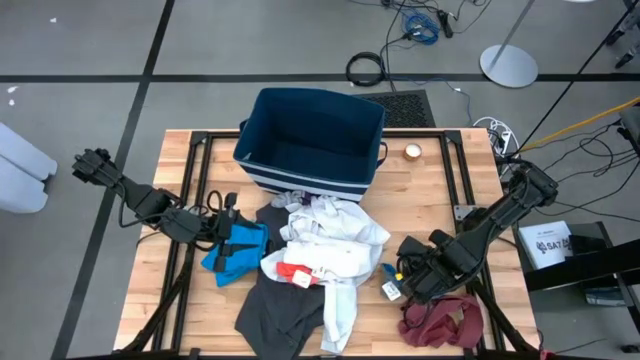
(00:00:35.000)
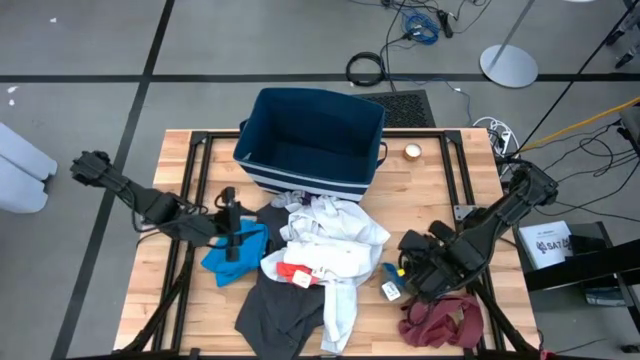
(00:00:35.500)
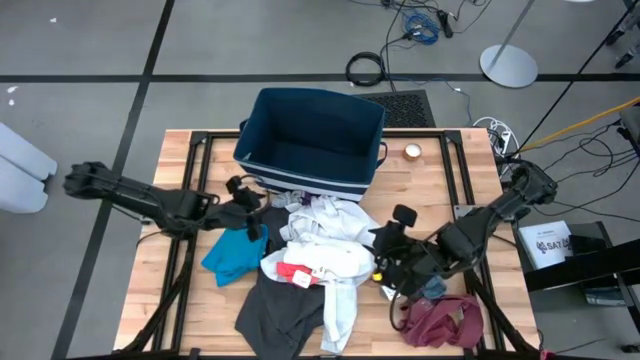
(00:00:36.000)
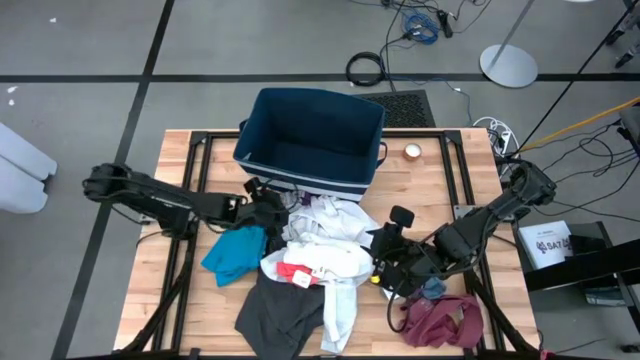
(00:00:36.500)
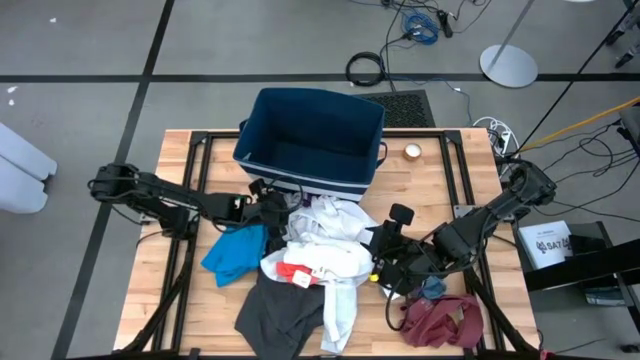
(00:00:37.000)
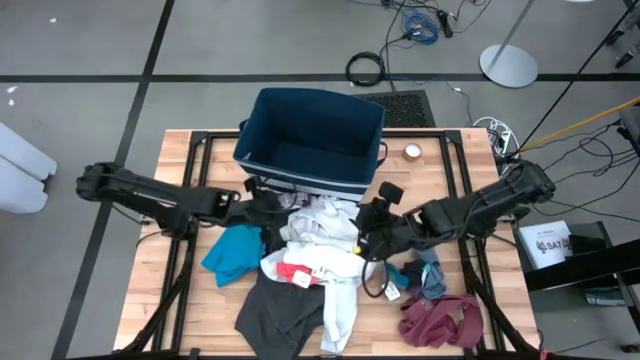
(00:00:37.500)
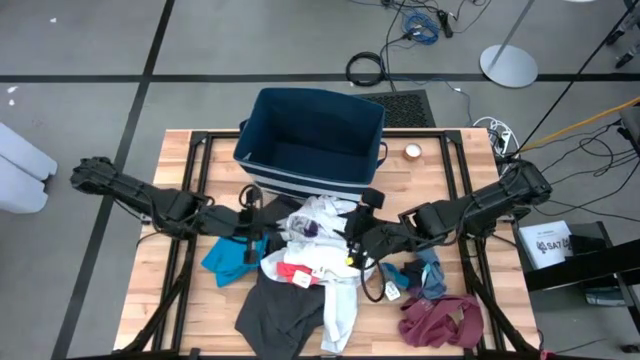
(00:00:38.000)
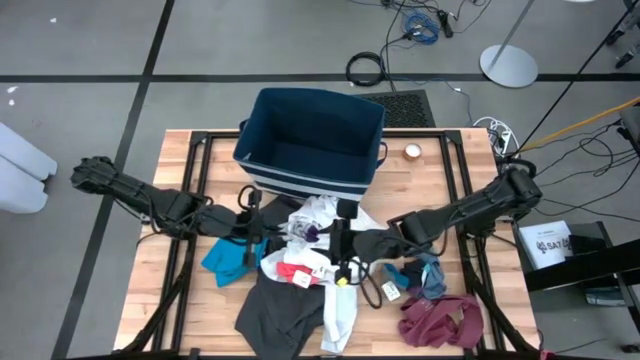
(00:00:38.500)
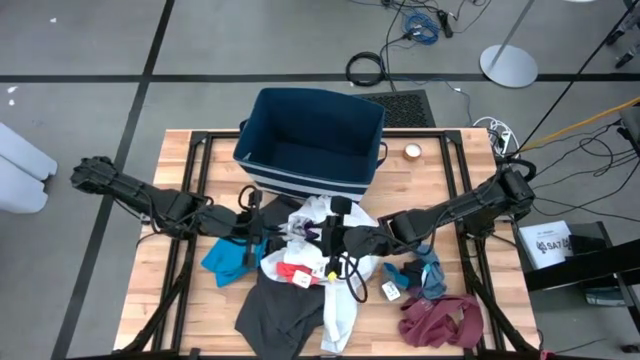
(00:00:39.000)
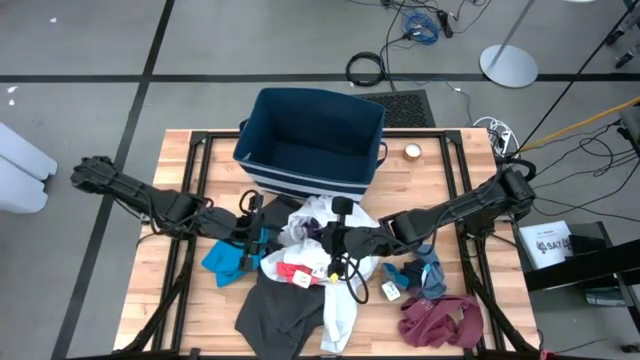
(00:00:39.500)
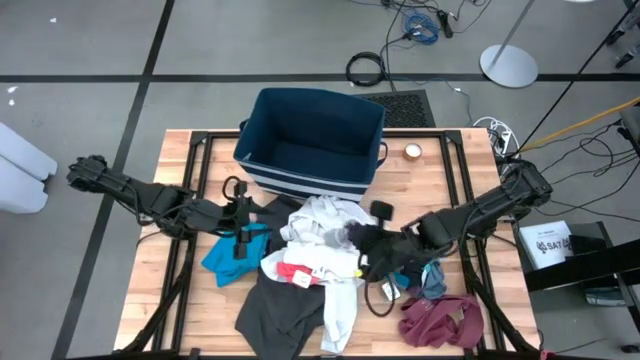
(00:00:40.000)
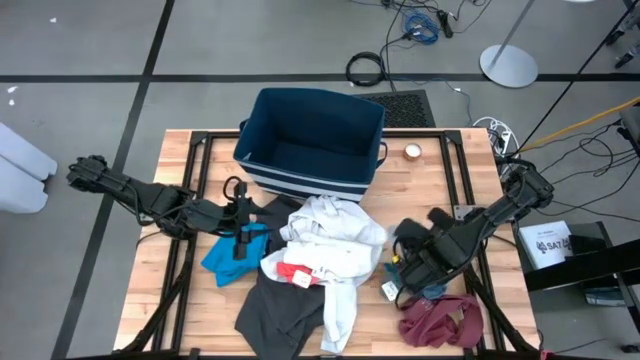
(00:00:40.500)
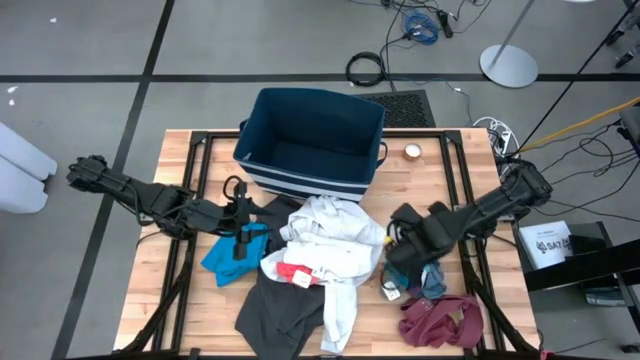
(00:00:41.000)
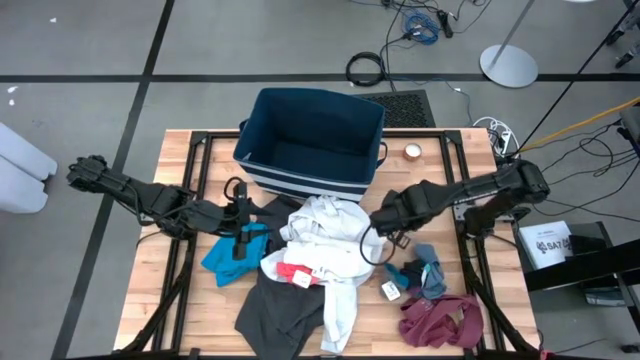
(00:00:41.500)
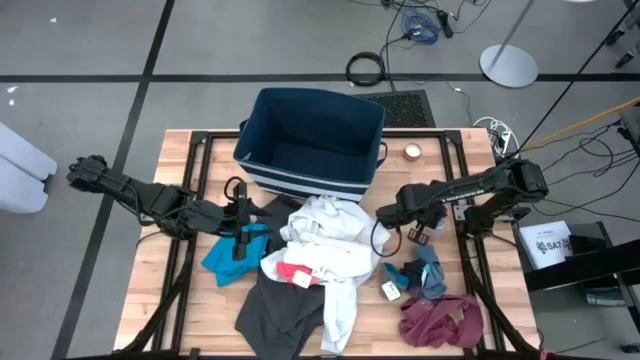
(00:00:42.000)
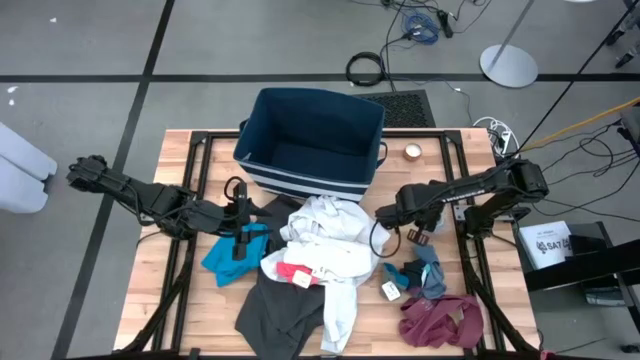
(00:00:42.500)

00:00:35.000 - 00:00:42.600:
Task: Sort clothes
Move the gray and purple sock to the right of the table

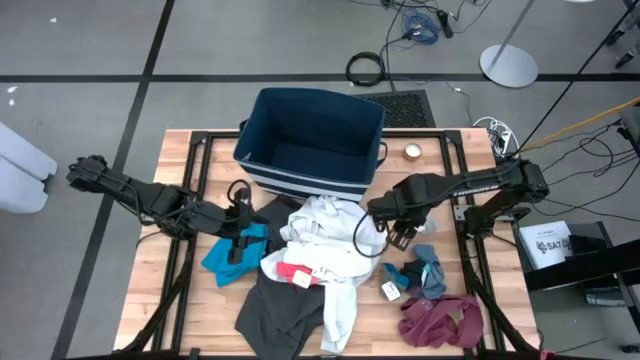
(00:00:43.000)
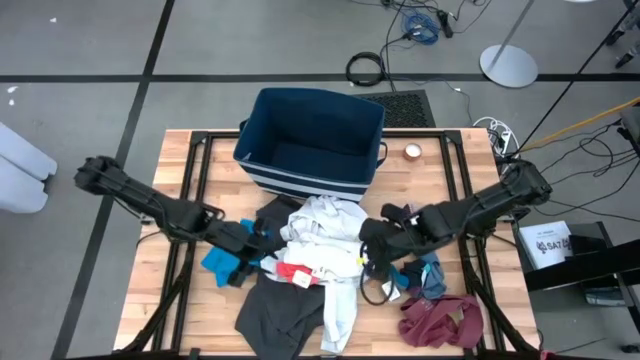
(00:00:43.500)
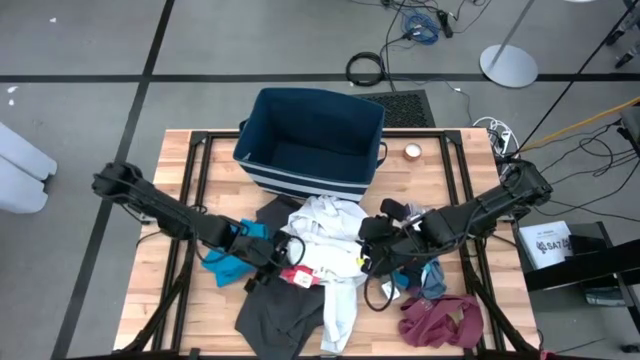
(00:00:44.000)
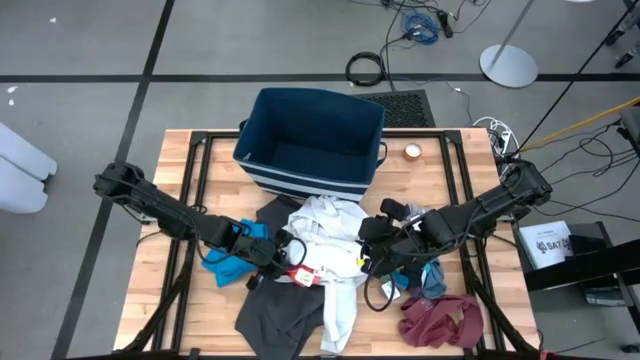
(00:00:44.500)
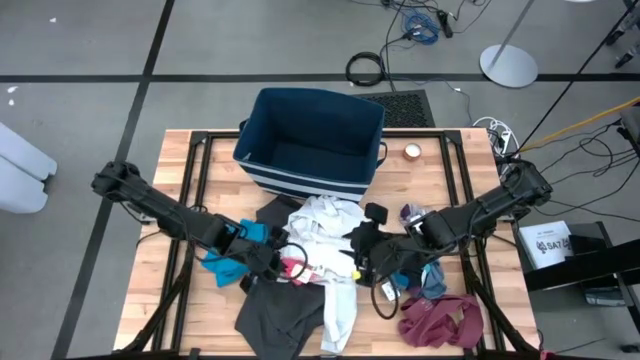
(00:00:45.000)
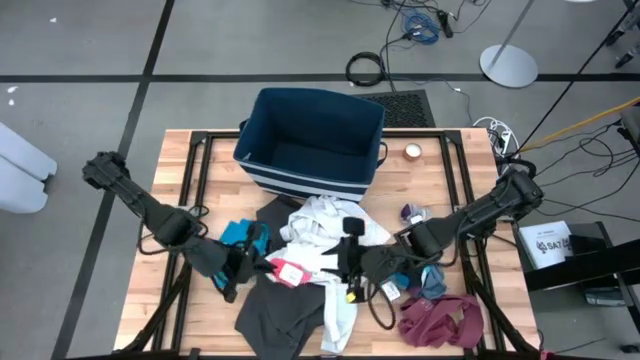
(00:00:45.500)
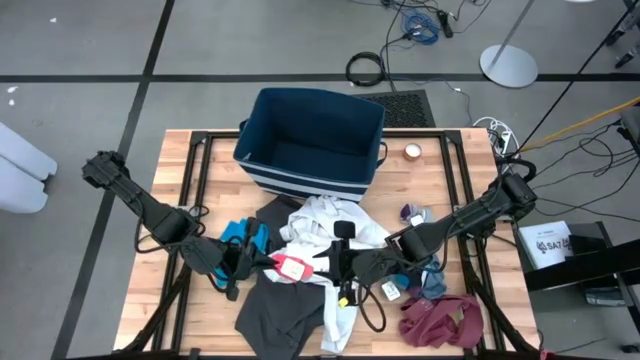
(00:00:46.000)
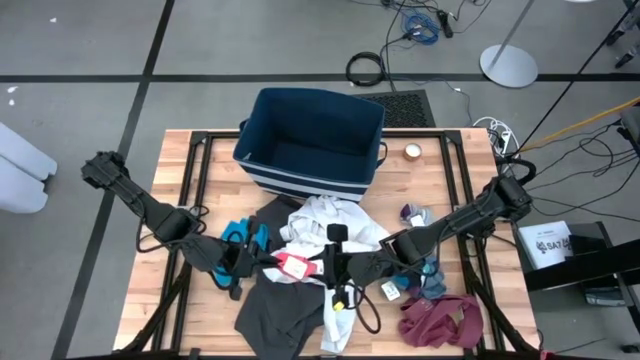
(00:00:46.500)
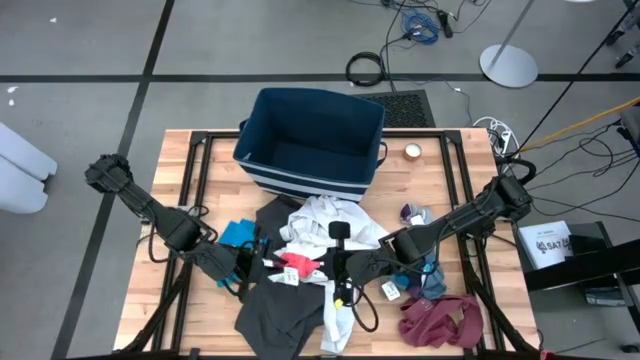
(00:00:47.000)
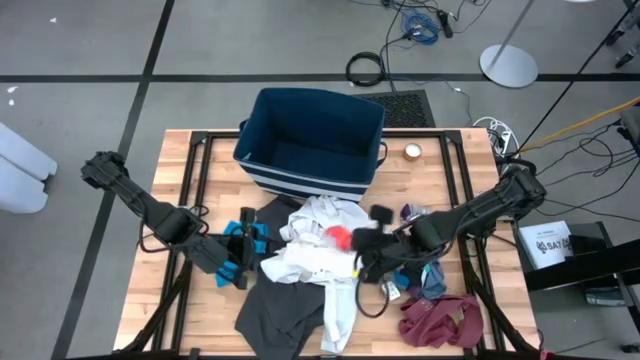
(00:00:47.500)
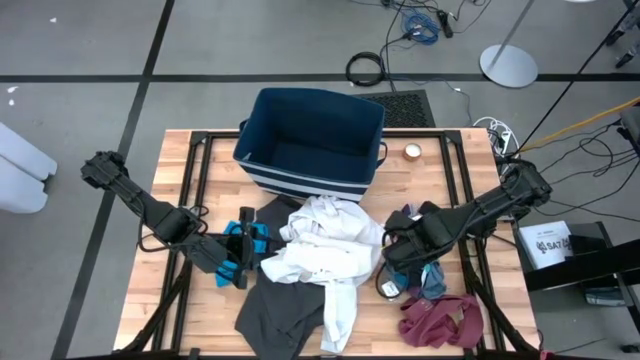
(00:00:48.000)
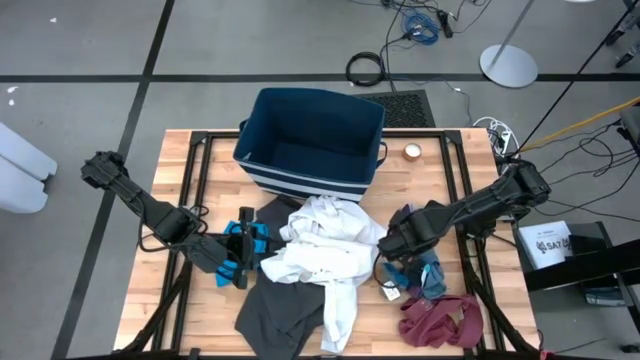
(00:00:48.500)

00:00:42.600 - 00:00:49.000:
Move the orange sock to the right of the table

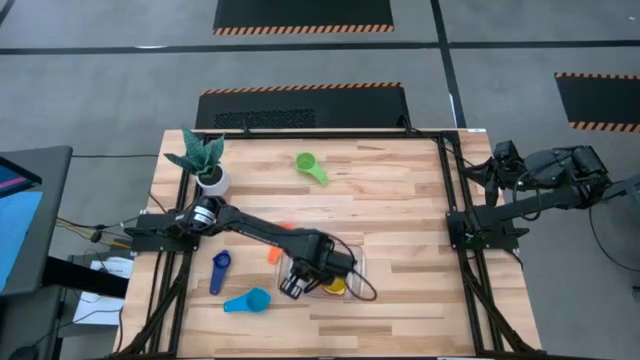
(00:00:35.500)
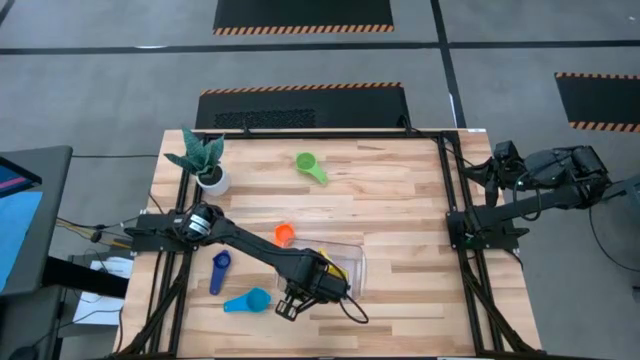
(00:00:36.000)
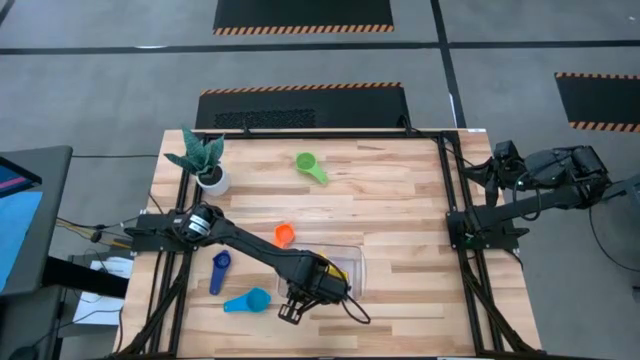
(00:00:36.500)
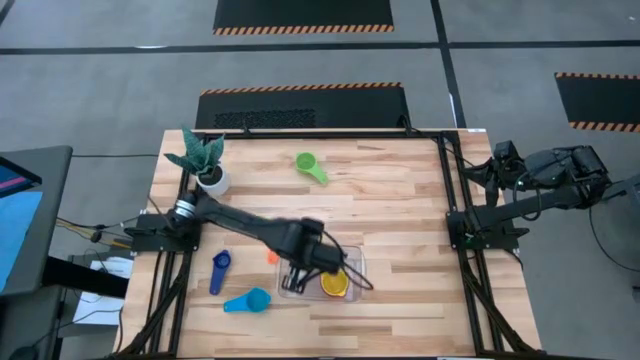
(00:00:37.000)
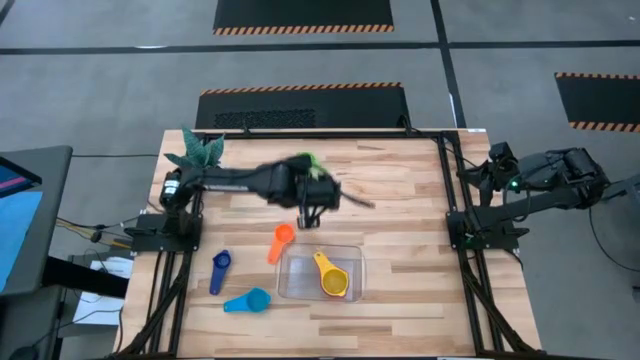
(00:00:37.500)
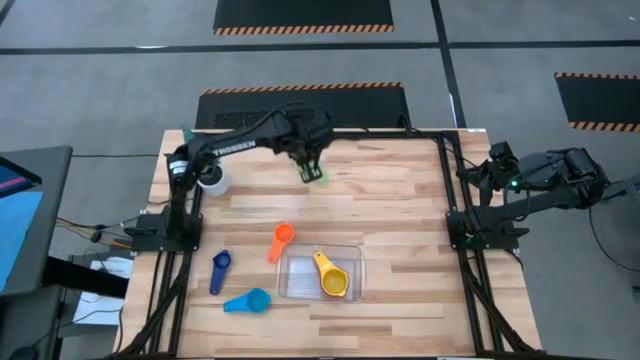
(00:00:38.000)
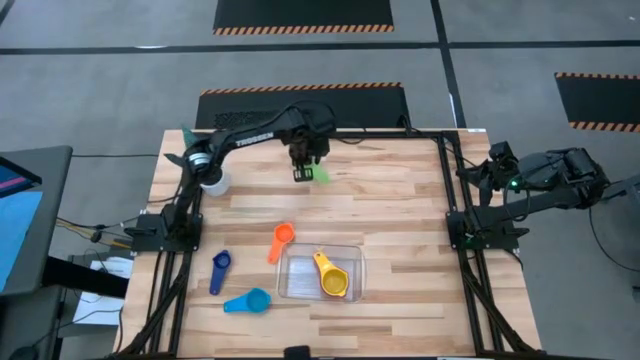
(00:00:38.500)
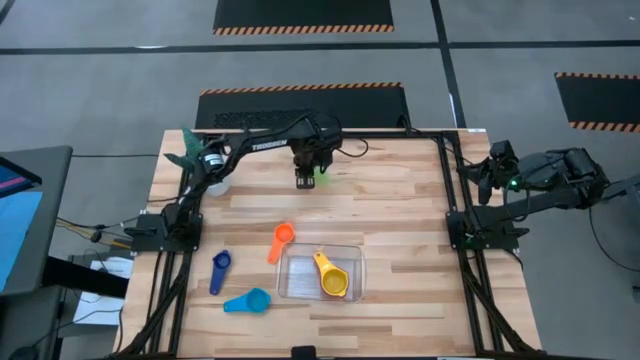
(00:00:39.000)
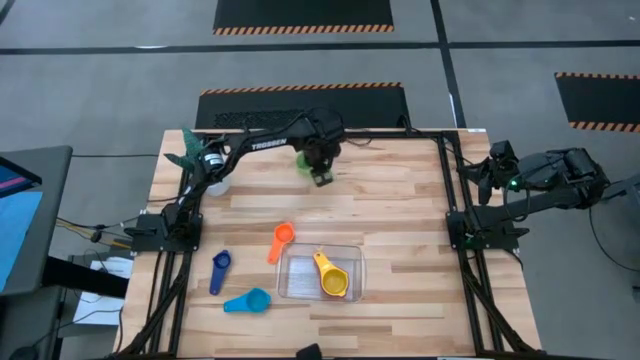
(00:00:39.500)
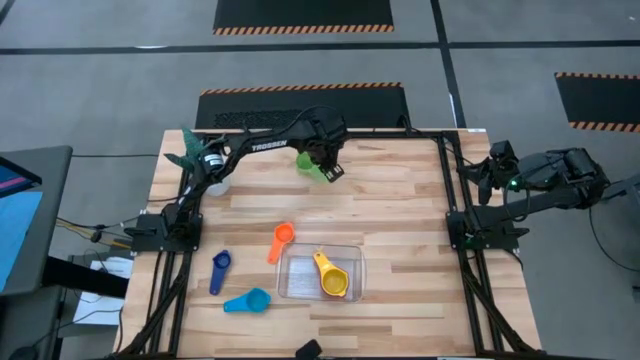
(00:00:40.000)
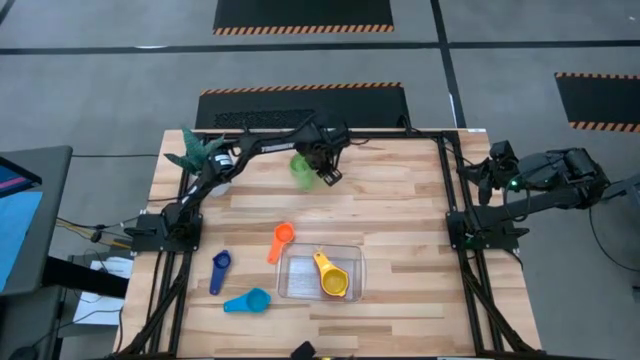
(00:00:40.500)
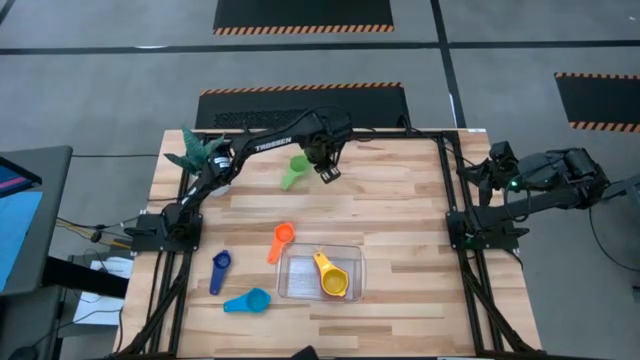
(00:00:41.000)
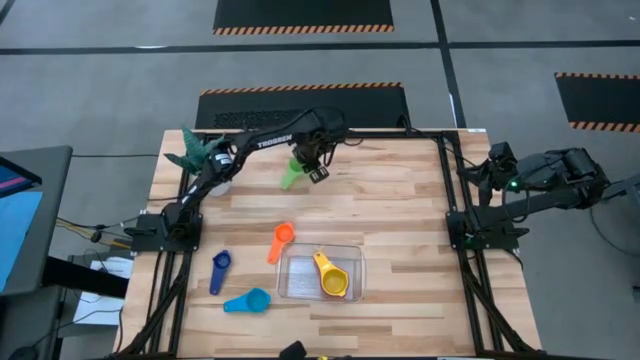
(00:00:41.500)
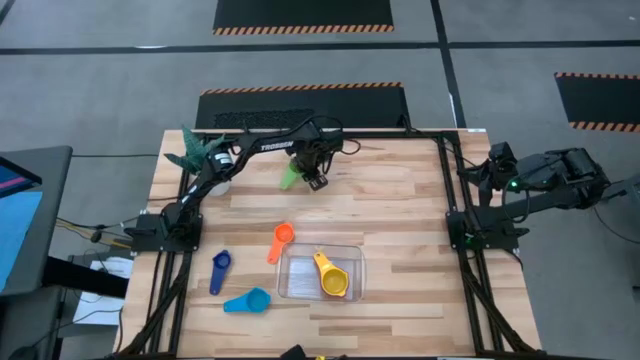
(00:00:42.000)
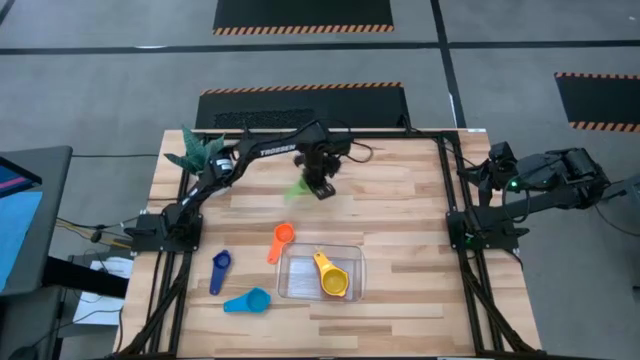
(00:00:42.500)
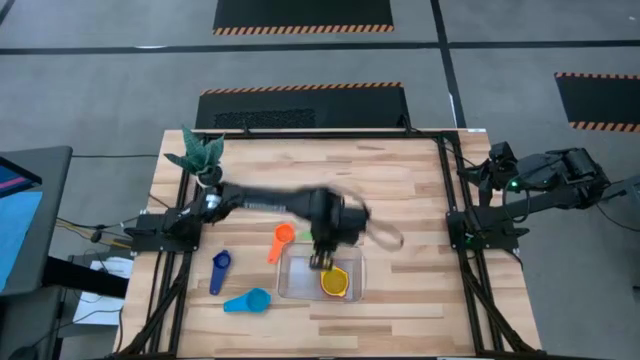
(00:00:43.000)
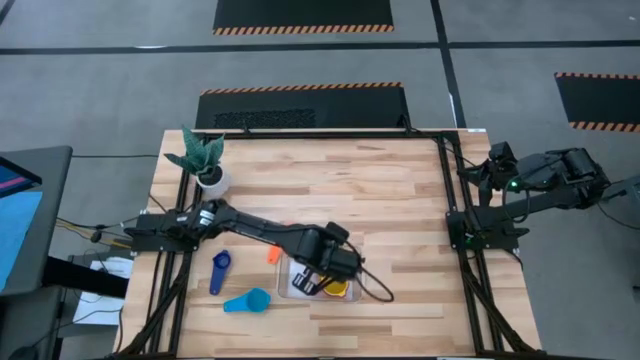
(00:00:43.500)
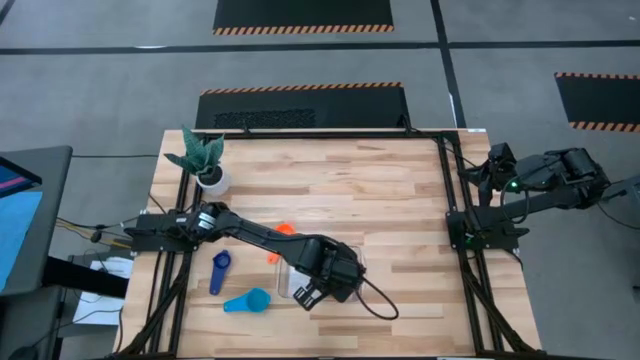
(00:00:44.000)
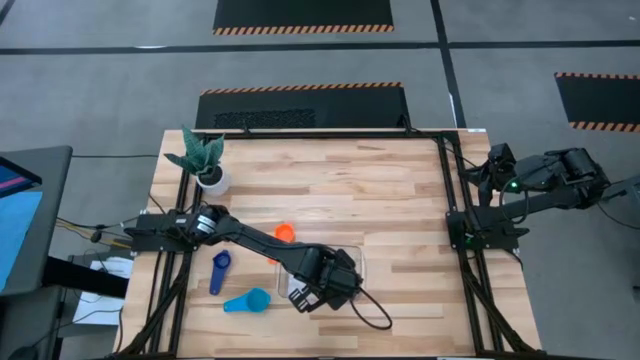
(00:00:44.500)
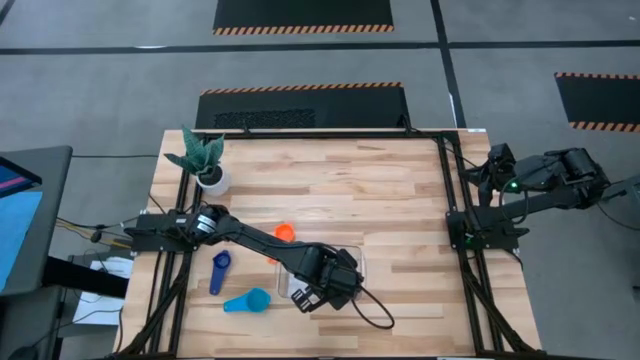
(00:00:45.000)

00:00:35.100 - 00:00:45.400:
Task: Nest measuring cups in basket
Stack the green measuring cup on top of the yellow measuring cup in the transparent bin
